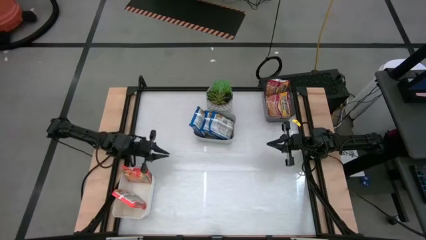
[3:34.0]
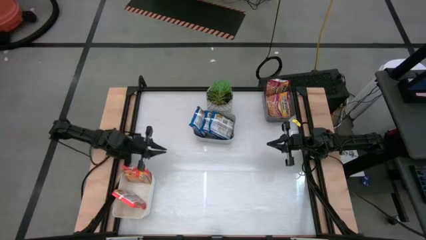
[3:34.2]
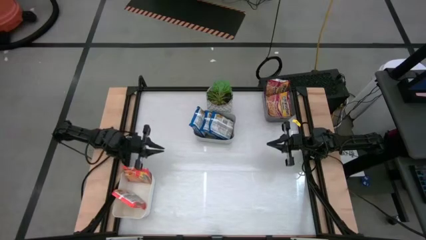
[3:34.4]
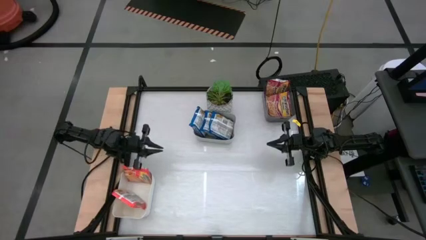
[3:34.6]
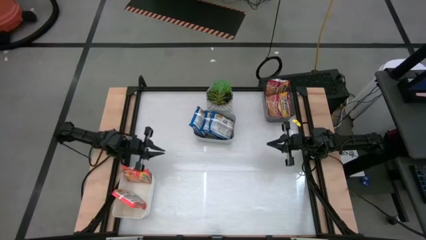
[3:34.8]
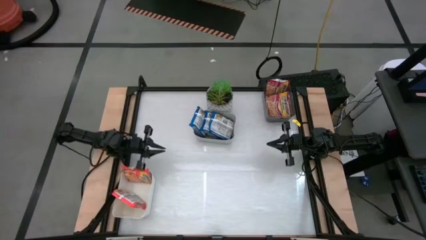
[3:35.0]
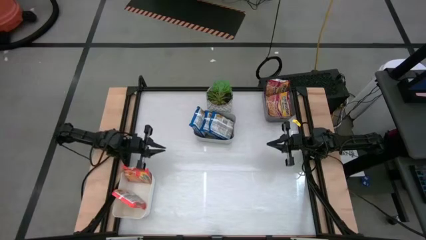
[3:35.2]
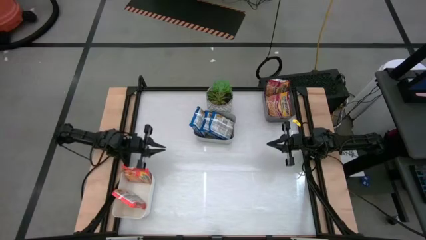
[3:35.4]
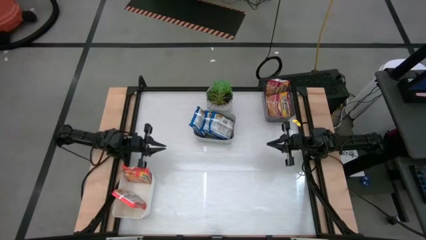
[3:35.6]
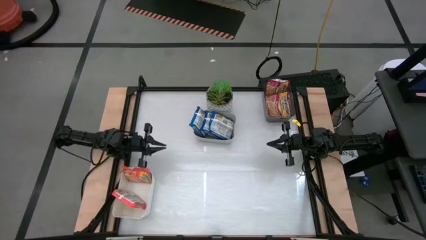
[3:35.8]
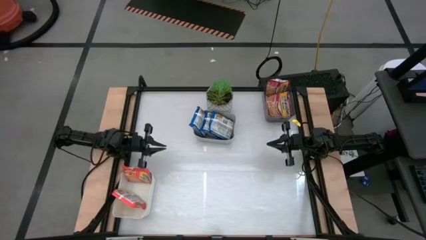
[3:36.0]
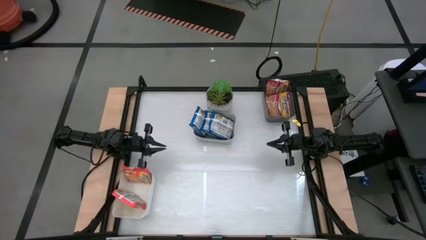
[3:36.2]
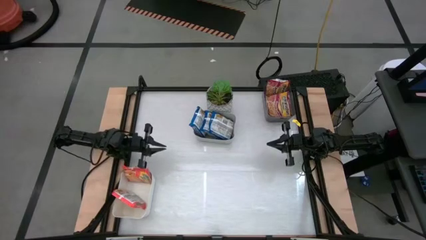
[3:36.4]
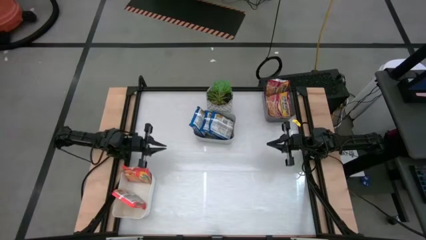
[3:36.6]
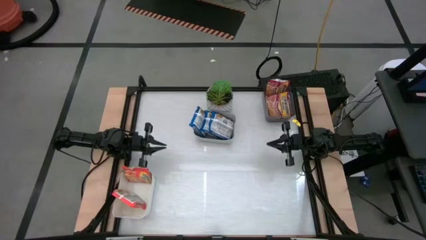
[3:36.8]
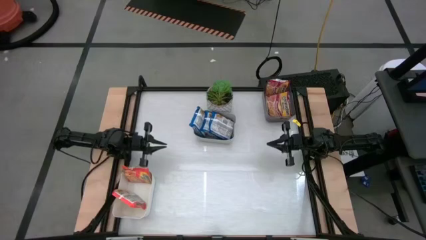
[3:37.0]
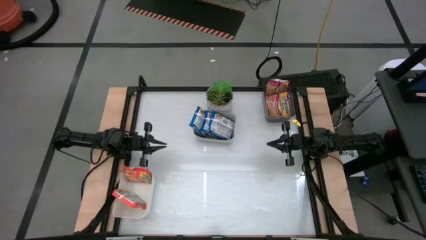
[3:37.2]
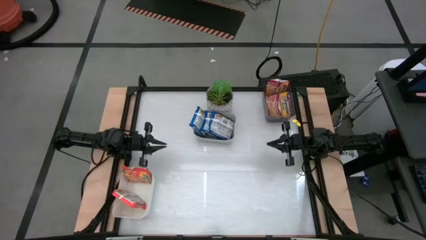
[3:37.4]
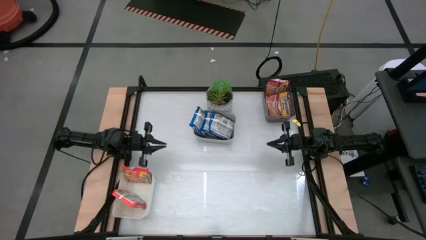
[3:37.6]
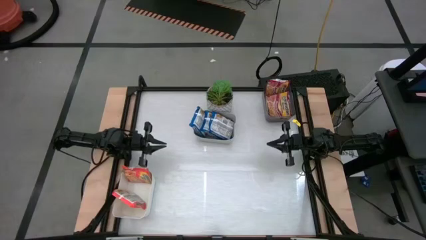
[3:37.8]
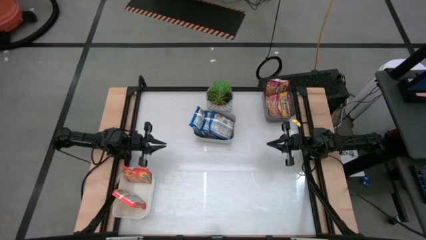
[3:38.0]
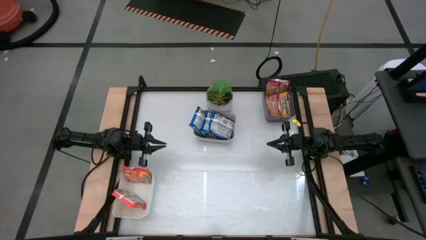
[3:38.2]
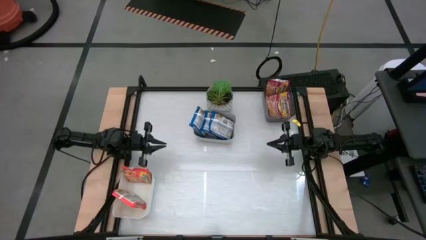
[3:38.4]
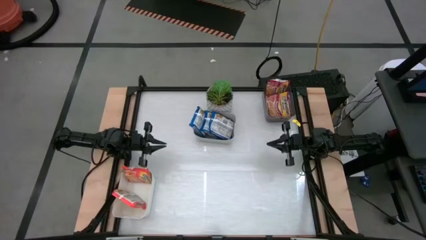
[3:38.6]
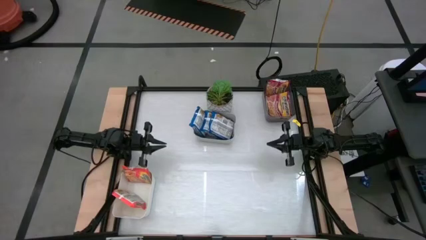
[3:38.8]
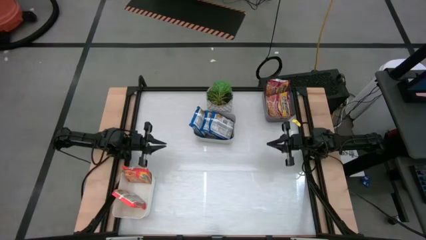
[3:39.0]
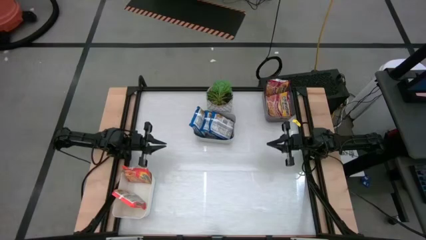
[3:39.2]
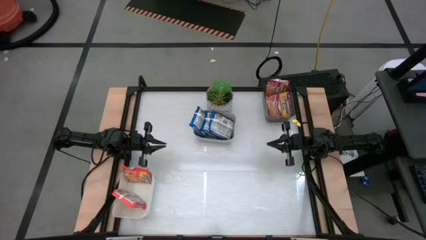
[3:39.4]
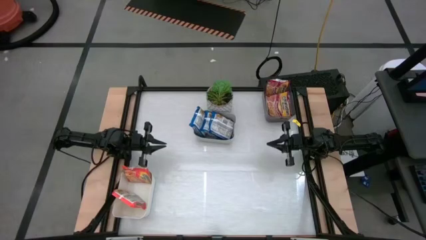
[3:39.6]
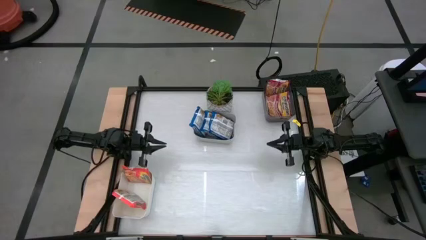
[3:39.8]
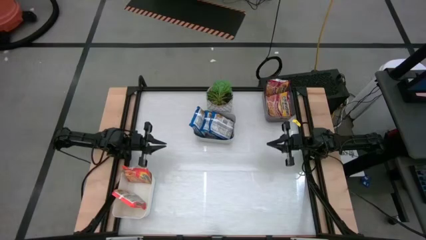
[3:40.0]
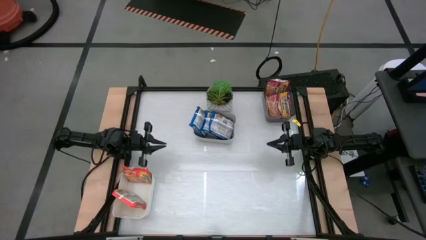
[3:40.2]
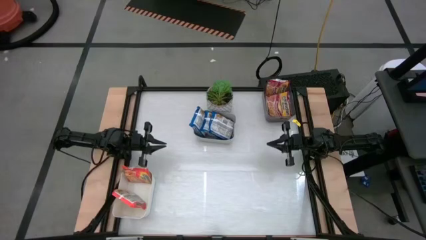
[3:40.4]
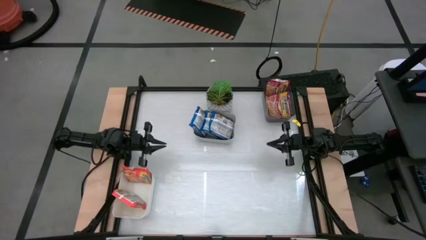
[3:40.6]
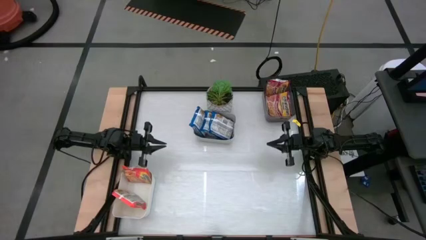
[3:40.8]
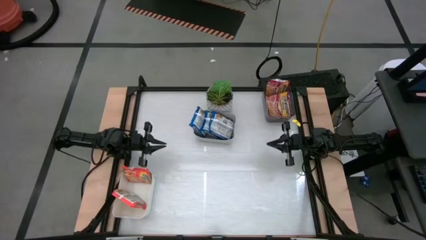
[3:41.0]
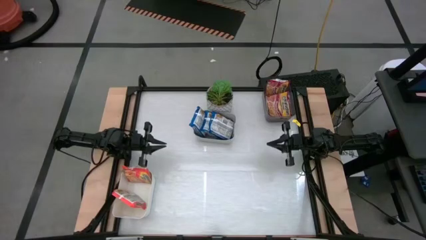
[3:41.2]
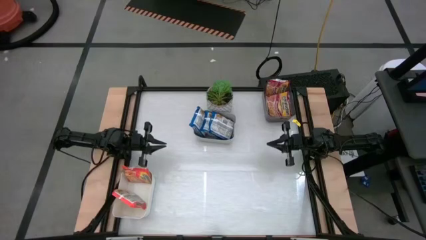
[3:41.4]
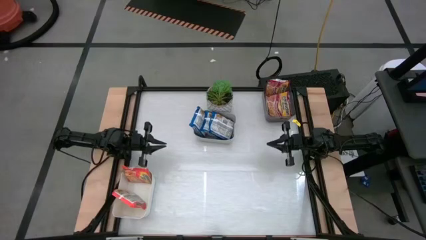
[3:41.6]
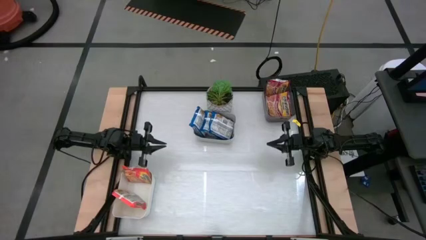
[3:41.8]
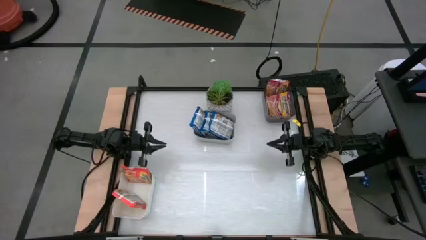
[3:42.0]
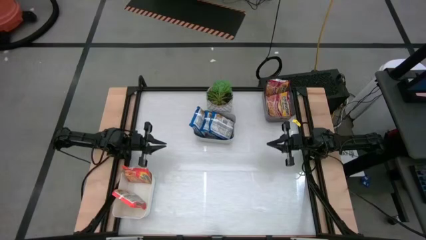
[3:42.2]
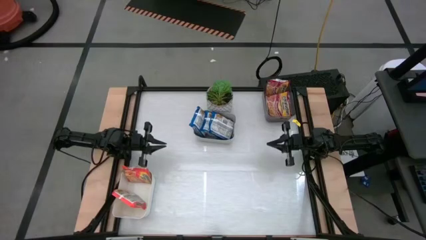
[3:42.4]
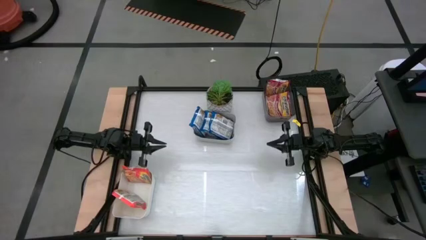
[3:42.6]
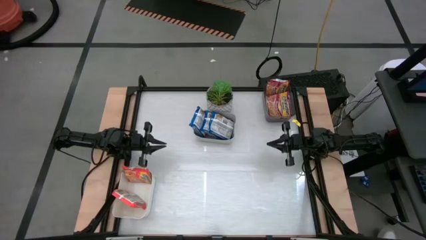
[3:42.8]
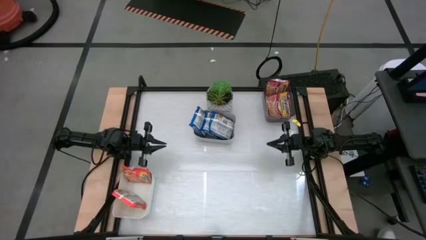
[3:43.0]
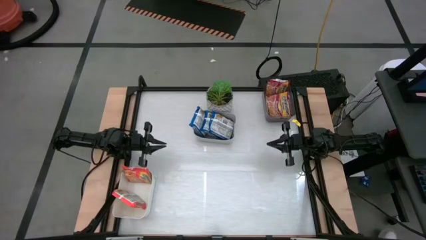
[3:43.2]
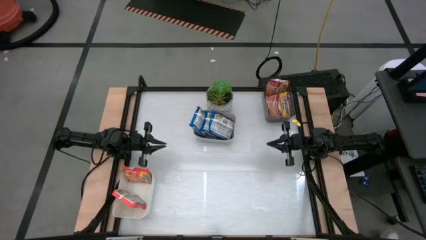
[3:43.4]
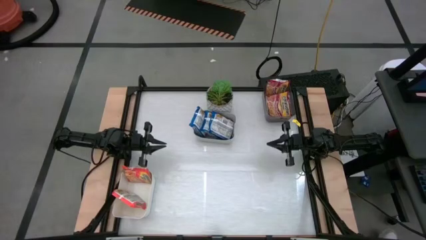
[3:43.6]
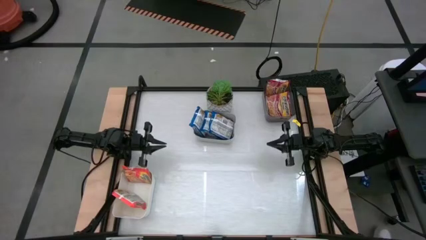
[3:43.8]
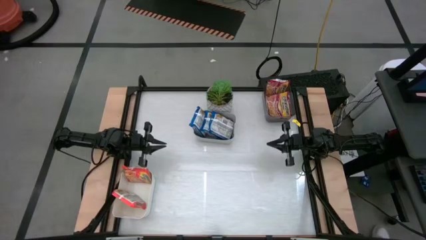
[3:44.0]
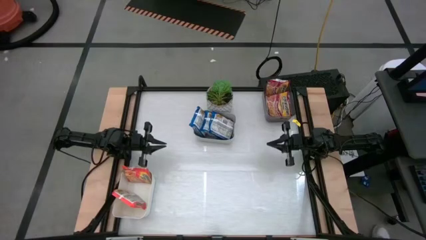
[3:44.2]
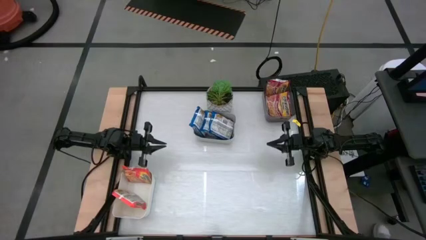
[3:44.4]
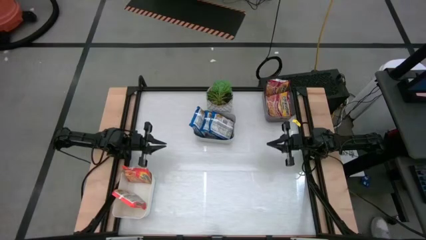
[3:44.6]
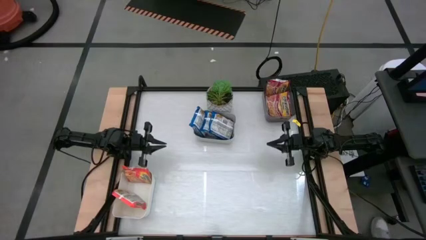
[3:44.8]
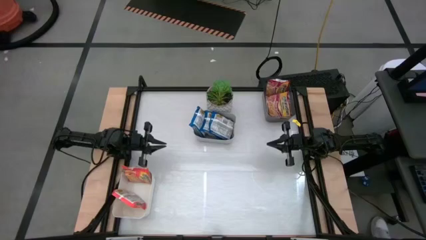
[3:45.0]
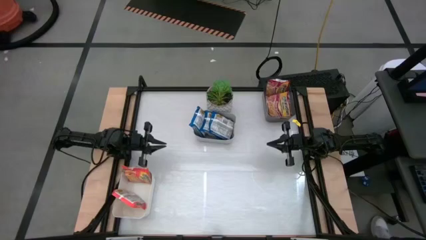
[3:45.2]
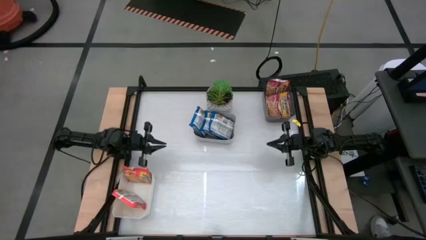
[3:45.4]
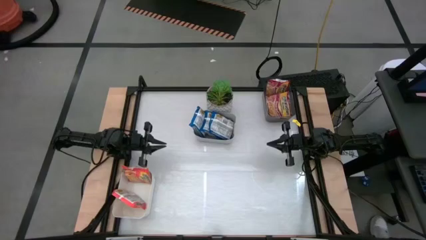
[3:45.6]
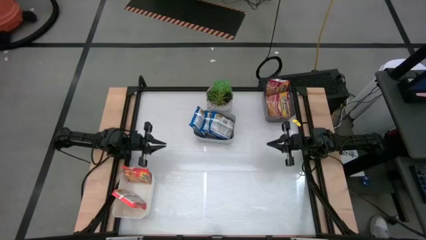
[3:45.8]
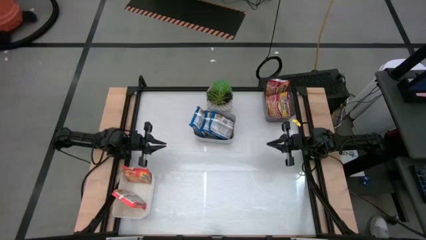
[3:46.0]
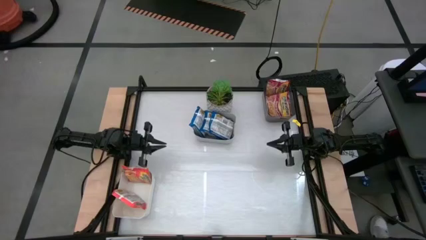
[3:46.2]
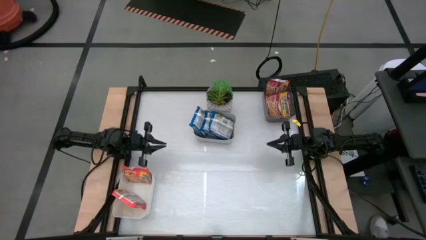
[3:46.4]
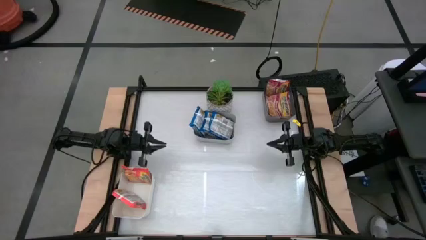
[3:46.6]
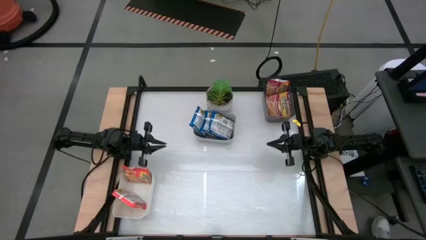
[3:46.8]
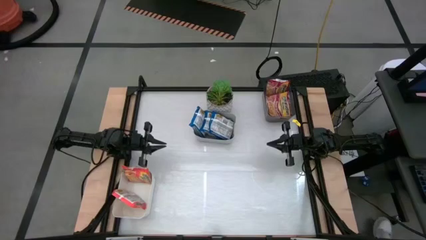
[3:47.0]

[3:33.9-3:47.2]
Task: Sort Maruchan noodles
Return to Home Position

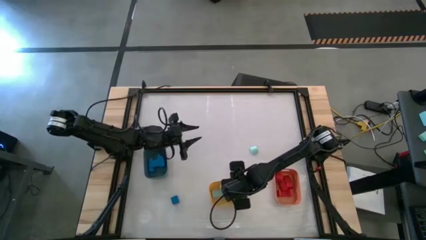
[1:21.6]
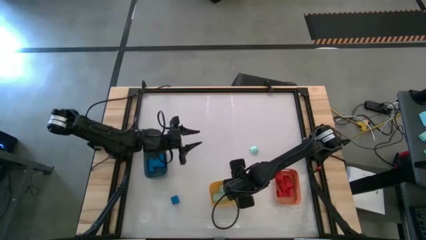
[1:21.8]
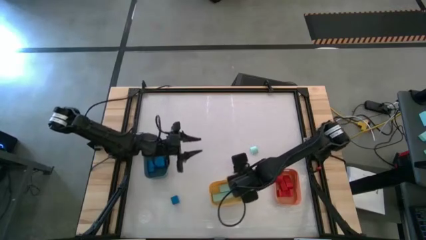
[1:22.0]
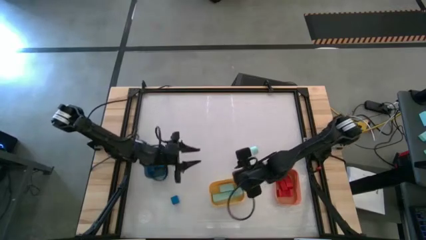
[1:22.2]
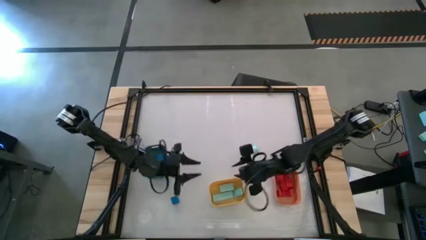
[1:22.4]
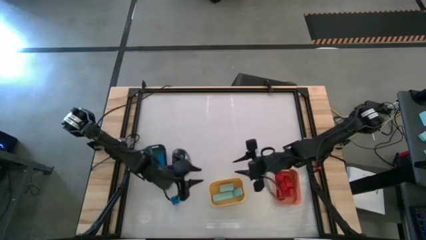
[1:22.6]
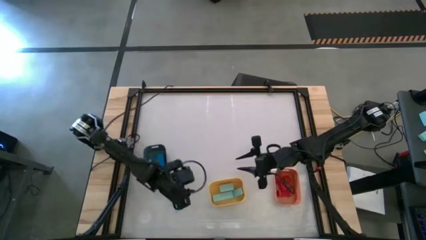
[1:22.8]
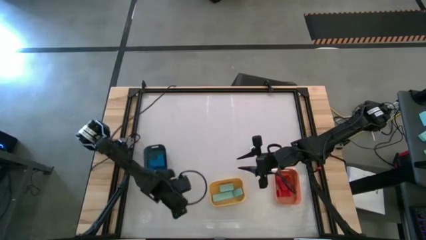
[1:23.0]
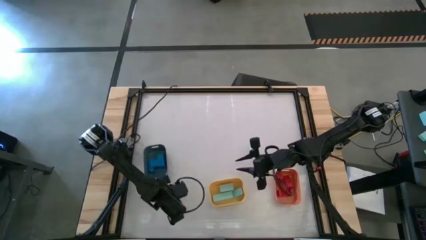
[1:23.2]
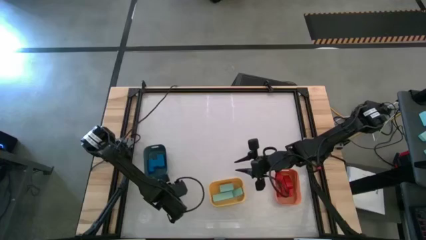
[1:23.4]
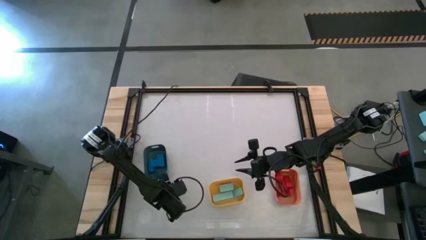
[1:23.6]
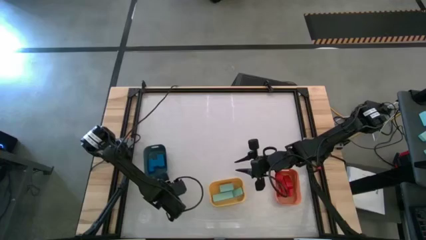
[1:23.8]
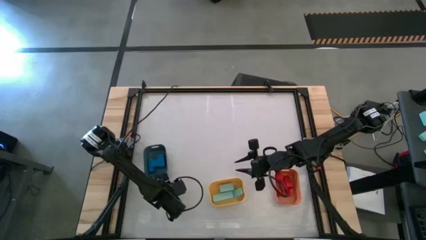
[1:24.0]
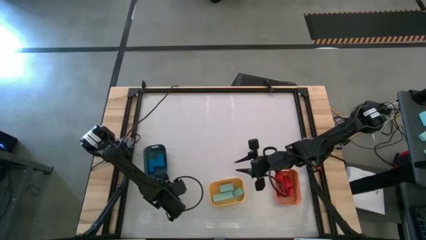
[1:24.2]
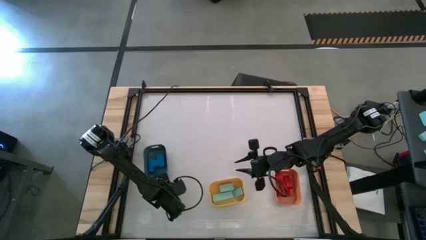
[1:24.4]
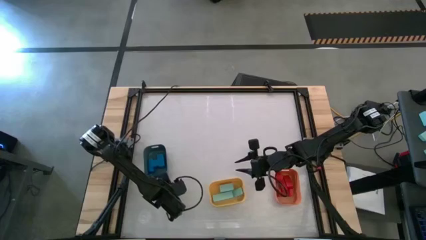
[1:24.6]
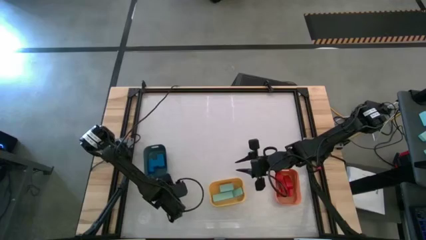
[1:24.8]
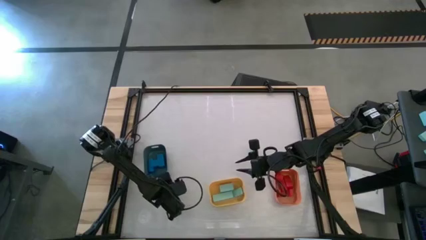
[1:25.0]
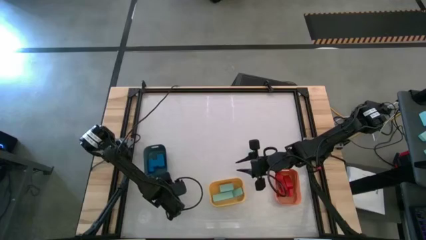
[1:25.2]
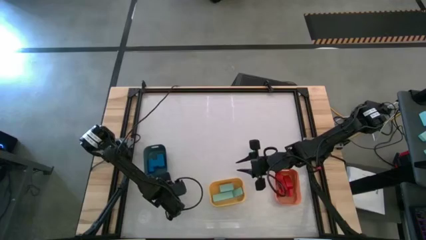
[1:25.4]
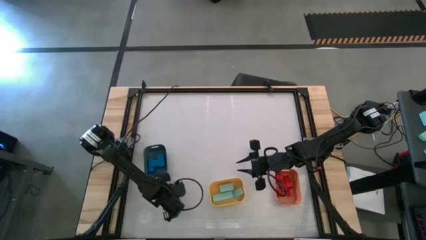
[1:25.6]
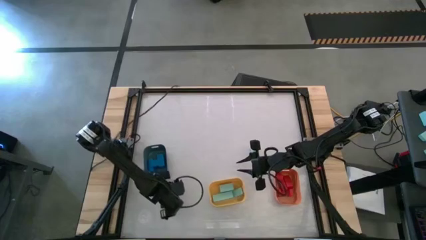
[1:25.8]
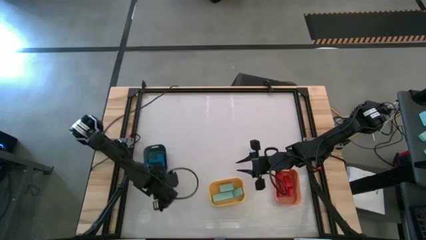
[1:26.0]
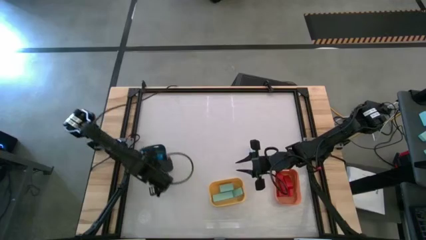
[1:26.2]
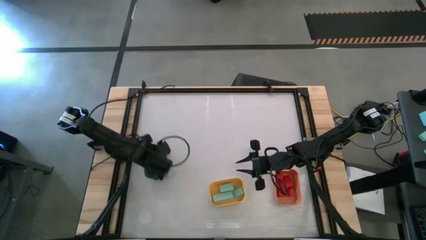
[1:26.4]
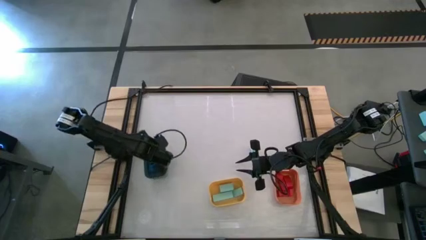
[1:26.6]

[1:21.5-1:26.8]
Task: Sort & place blocks by color
Put the blue block into the blue bin
